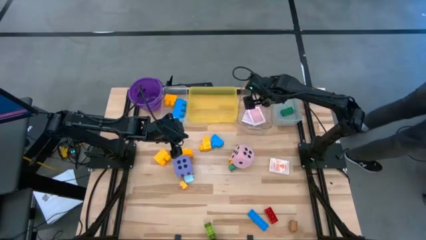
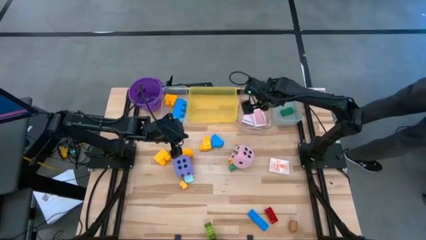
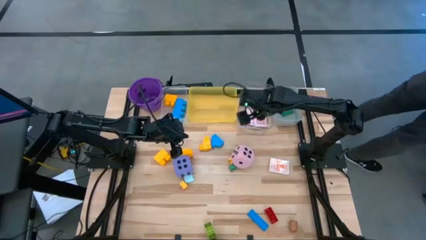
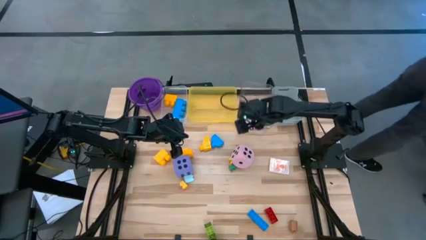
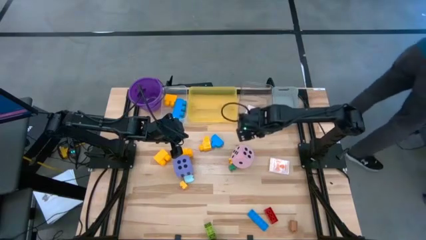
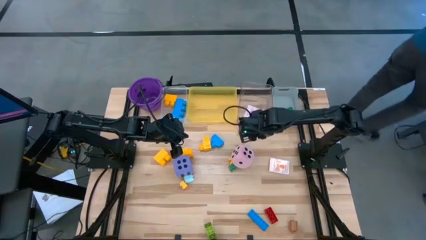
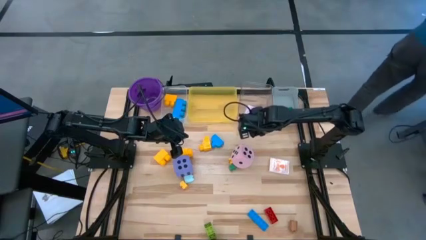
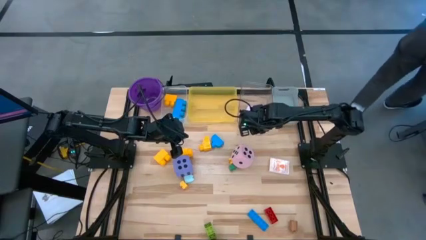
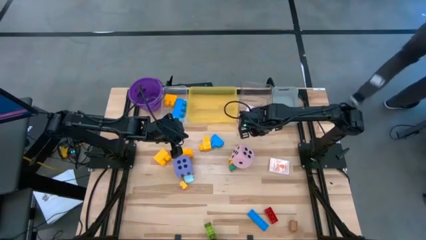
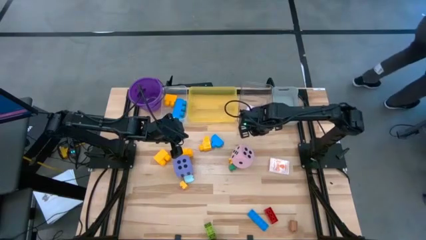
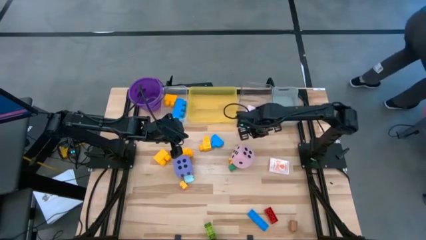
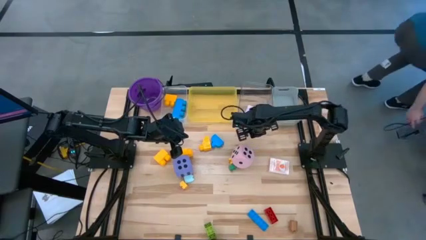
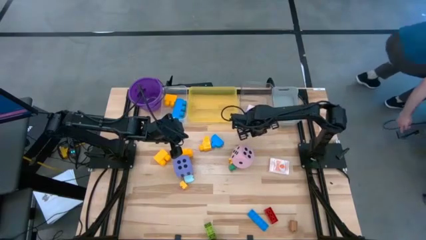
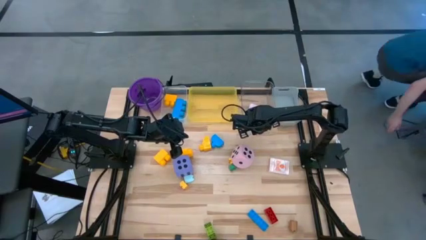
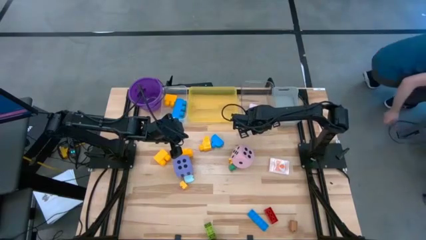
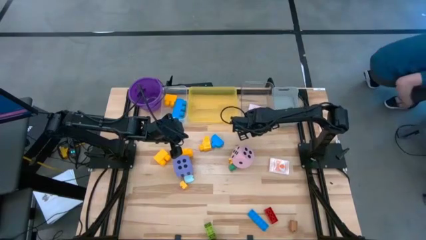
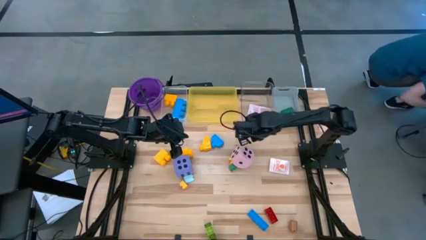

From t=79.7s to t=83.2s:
Task: Pick & Place Toys
Adjust the transparent bin

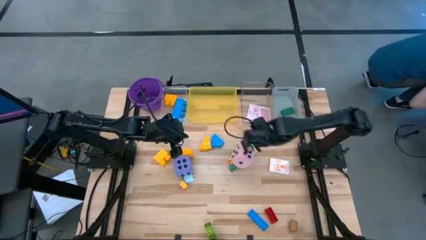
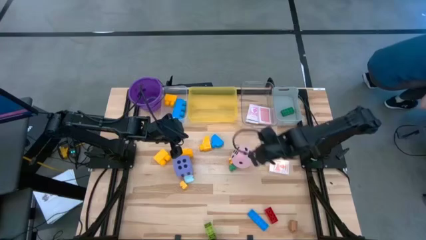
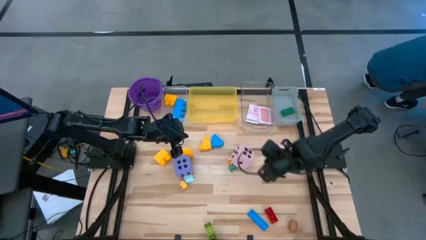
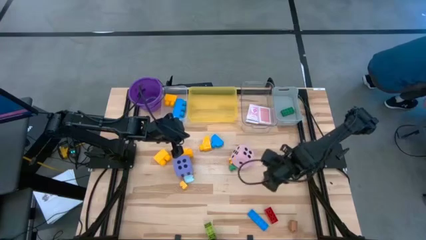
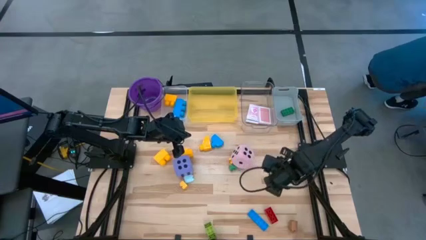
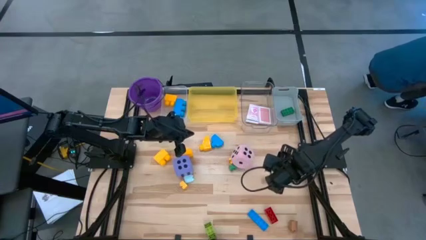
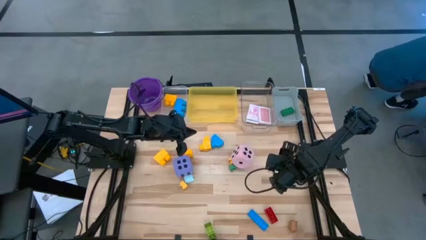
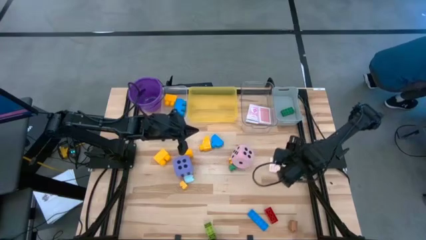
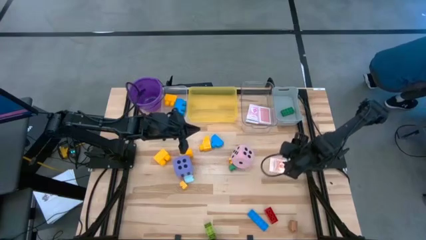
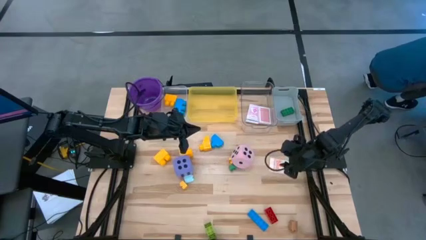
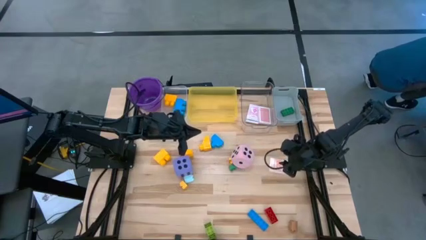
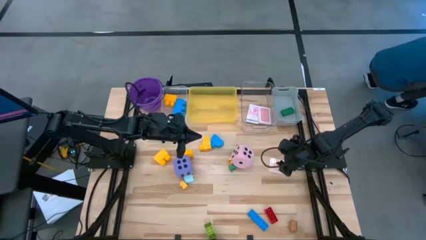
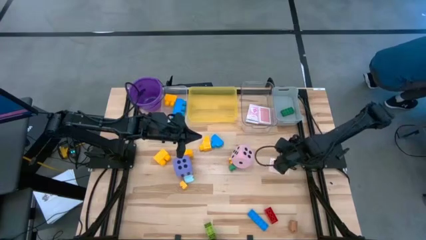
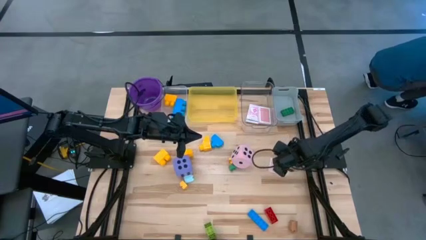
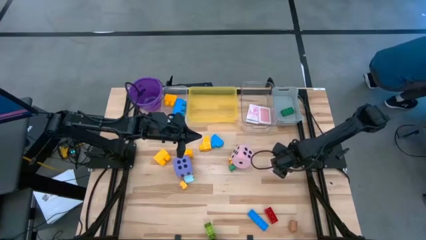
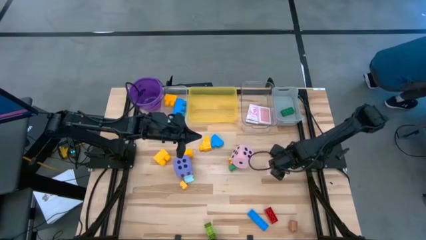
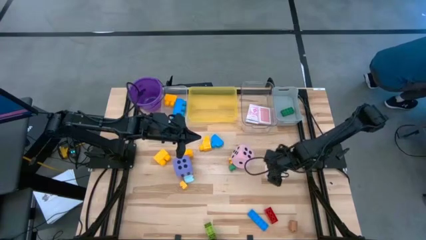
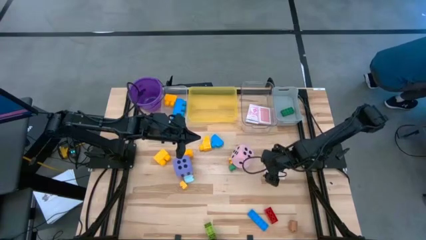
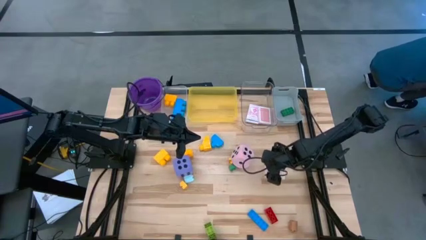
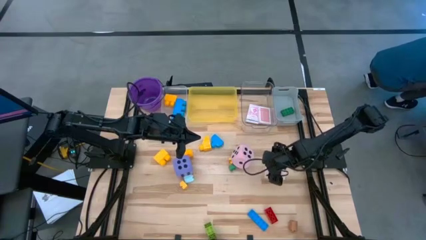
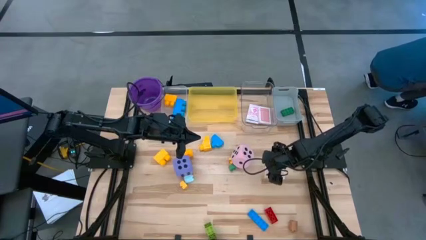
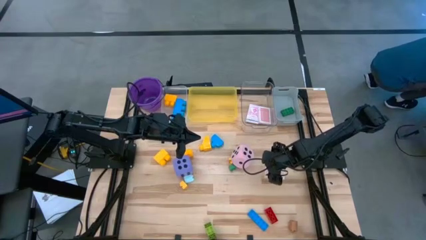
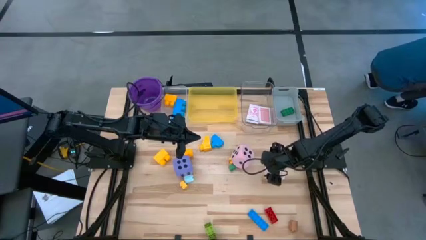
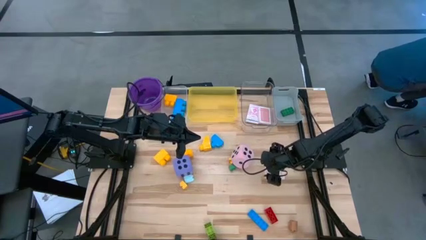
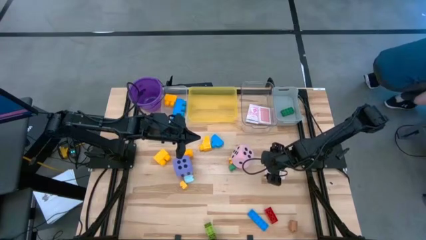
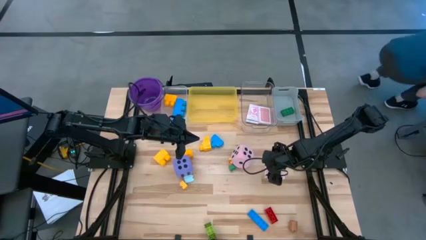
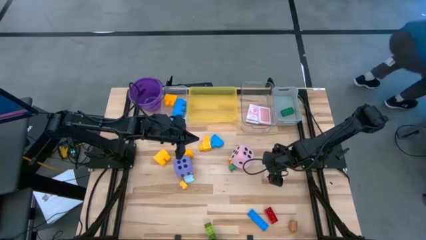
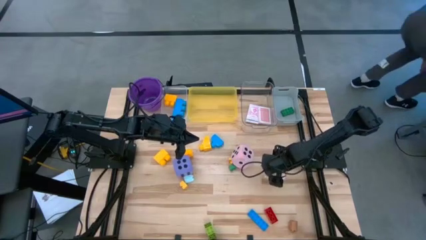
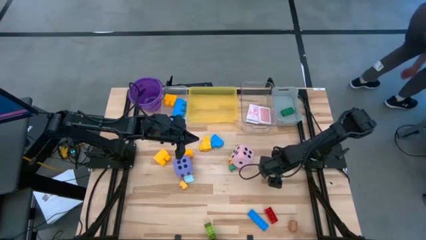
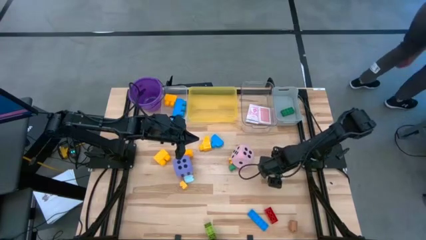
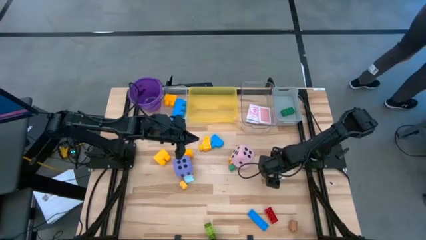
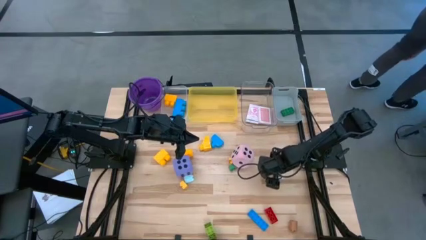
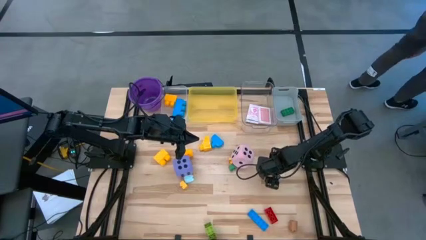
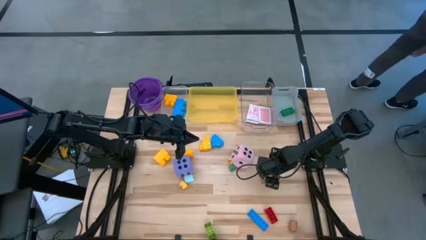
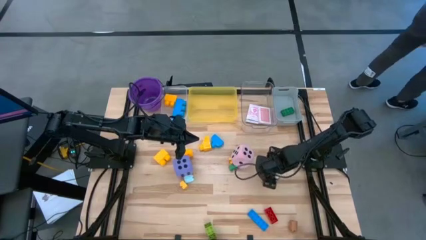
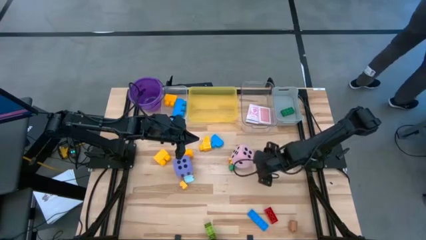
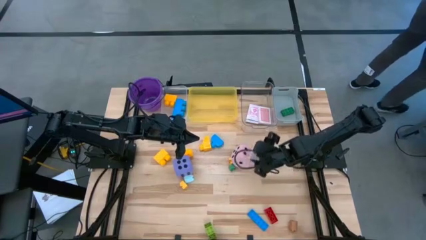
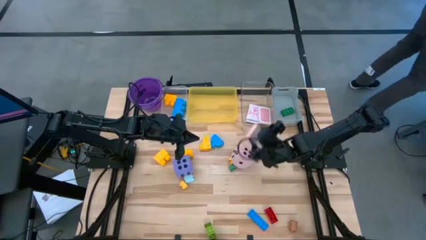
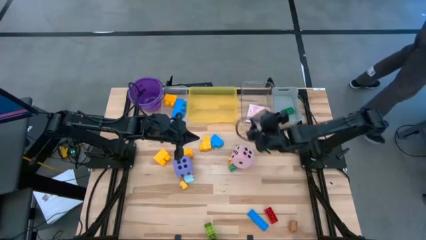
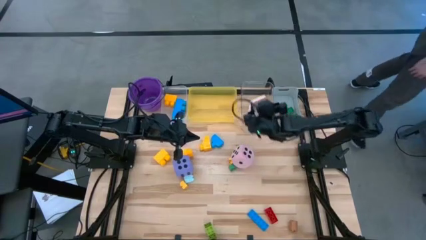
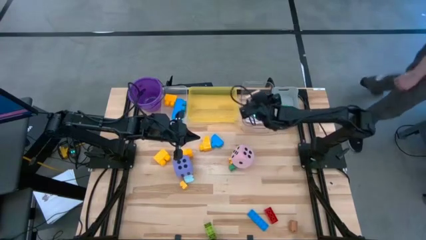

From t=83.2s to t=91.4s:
Put the orange deck of cards into the transparent bin

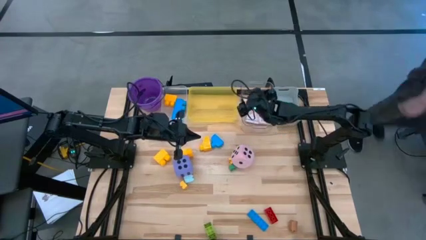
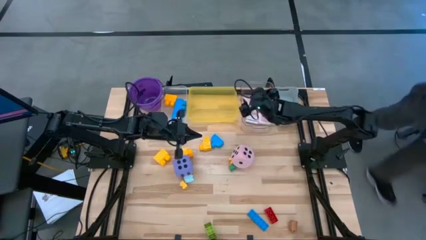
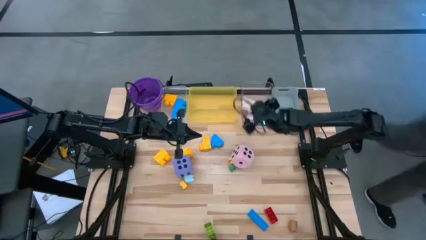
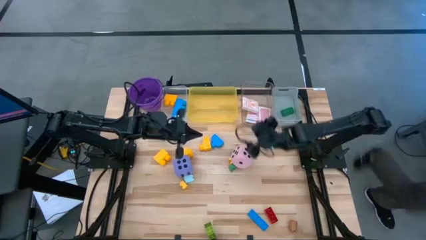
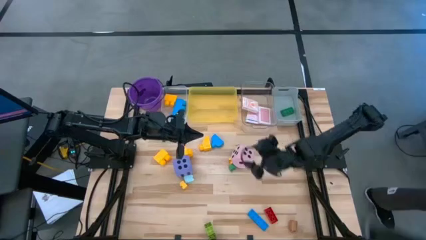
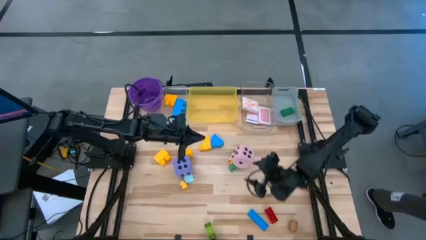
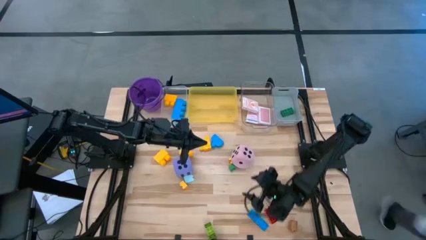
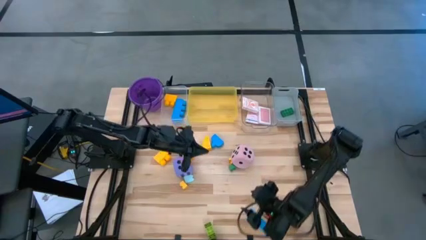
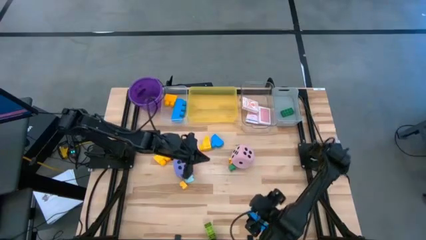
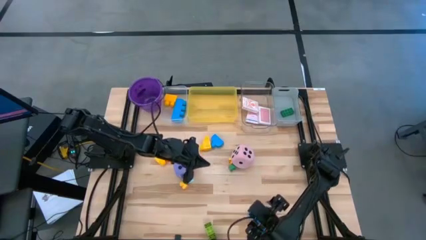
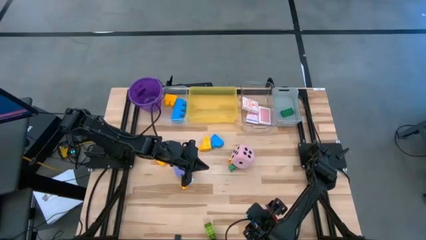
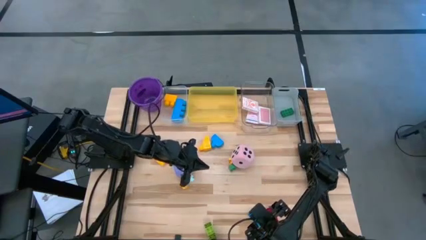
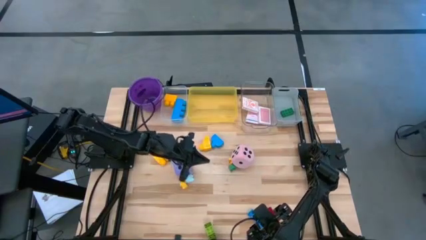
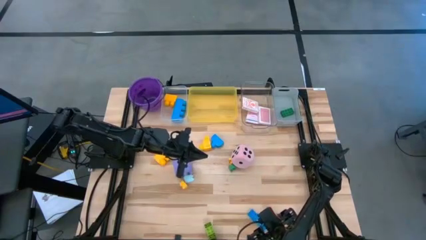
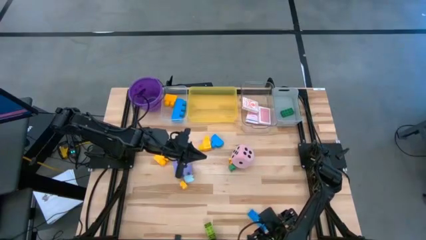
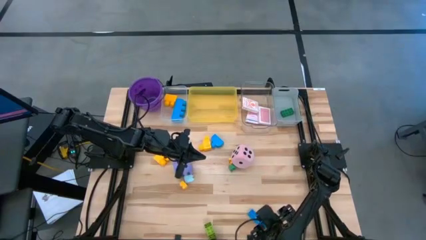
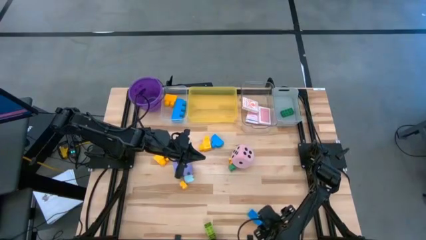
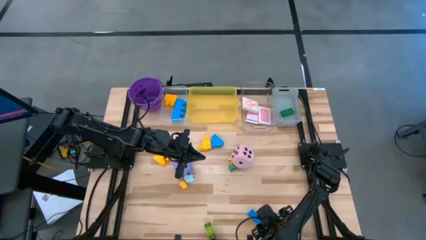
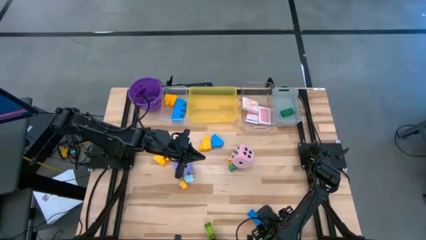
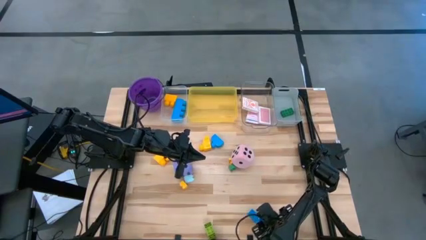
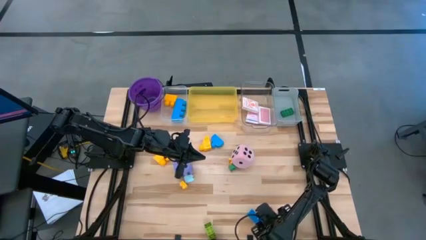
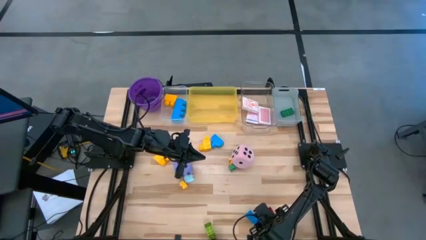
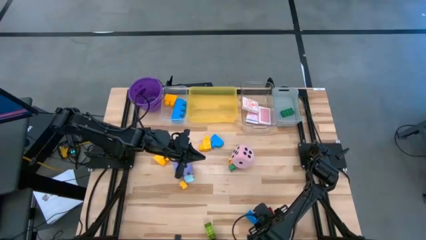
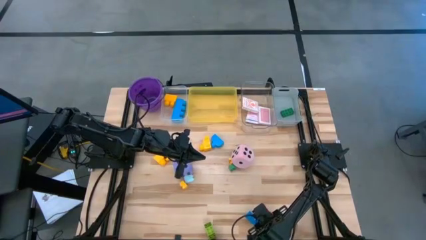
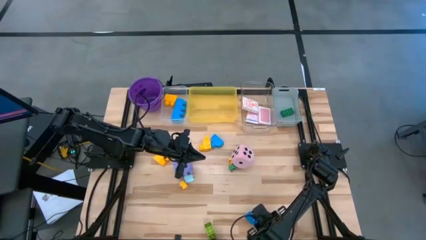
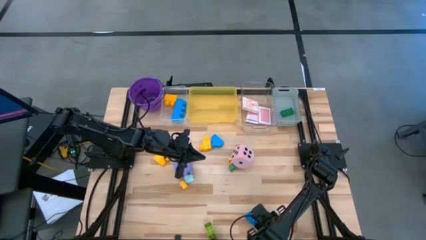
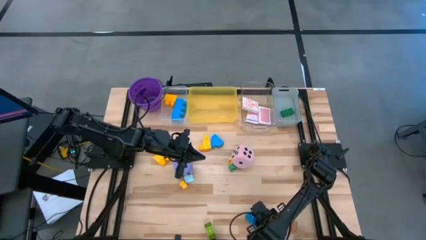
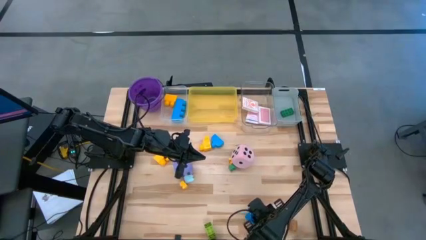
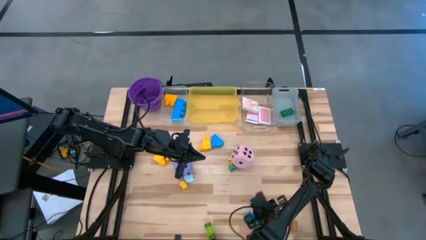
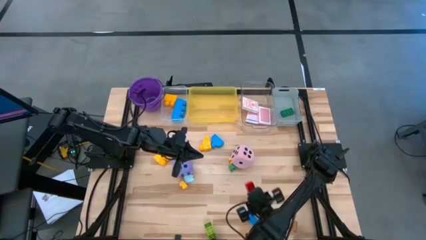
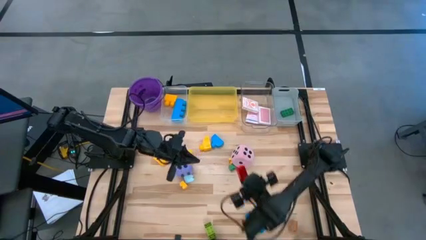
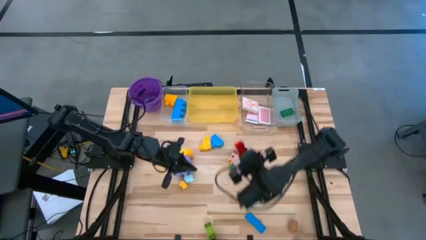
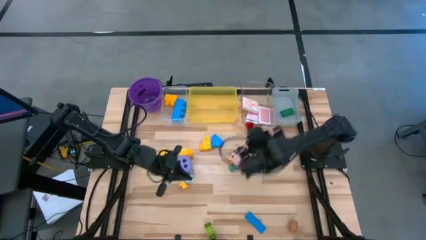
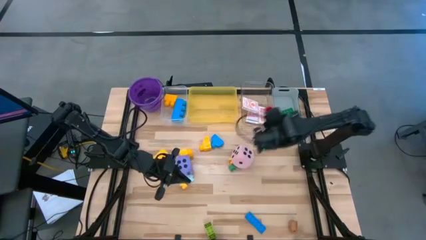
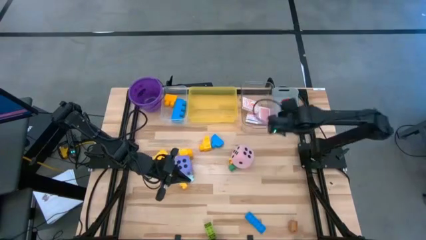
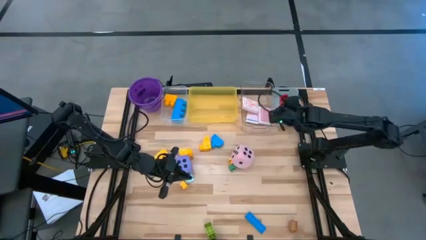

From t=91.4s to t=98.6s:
Put the small red game piece into the gray bin
